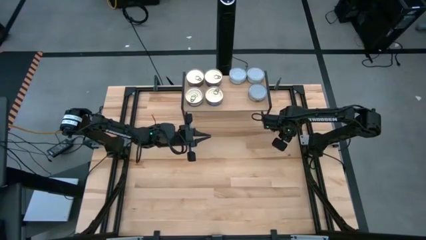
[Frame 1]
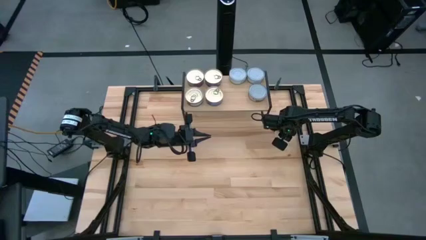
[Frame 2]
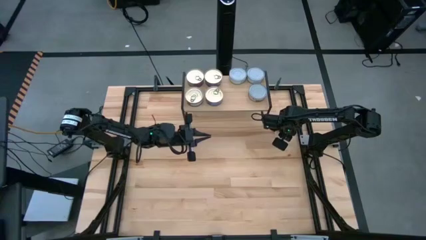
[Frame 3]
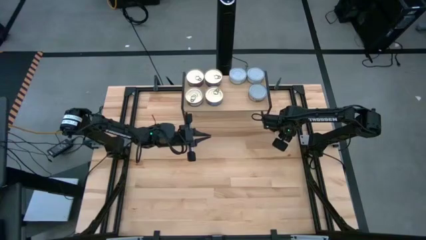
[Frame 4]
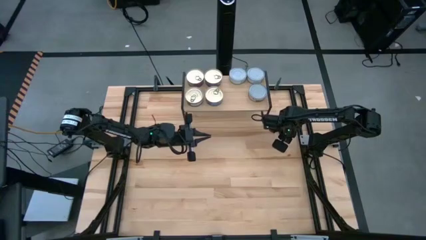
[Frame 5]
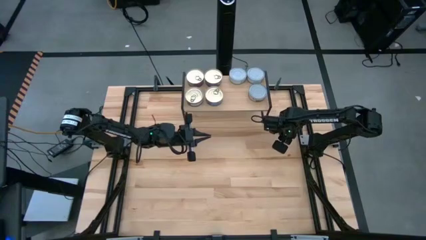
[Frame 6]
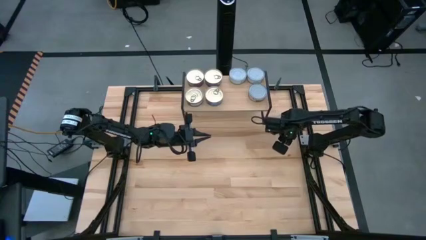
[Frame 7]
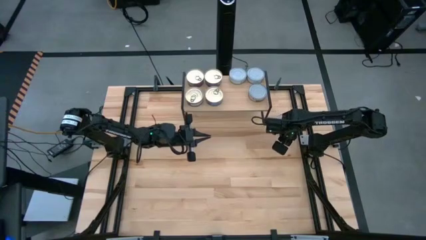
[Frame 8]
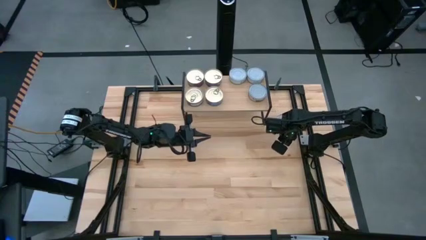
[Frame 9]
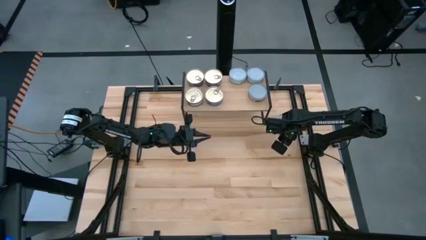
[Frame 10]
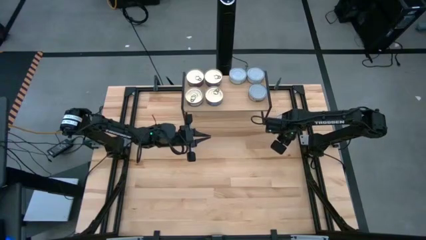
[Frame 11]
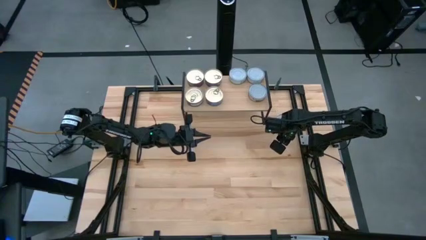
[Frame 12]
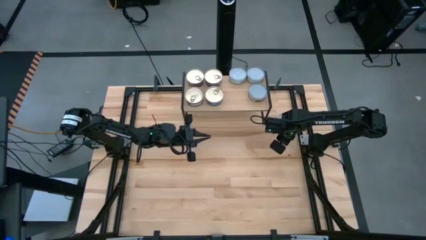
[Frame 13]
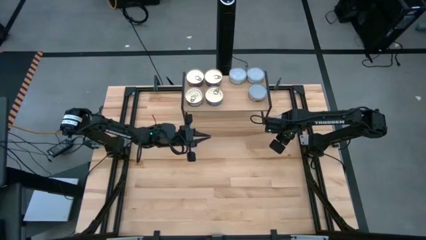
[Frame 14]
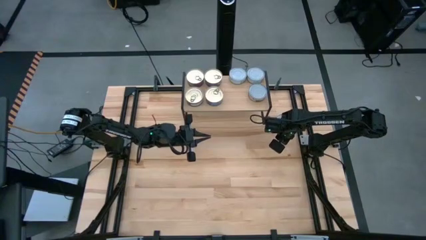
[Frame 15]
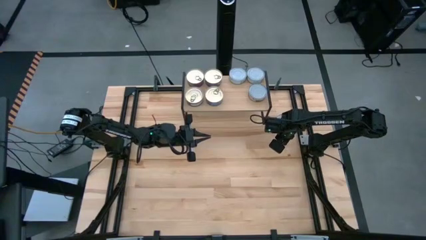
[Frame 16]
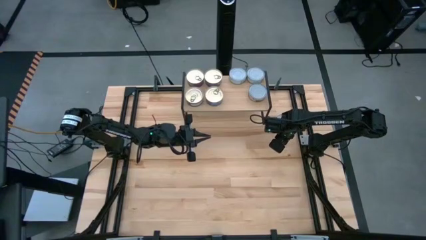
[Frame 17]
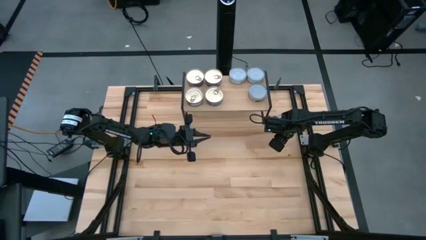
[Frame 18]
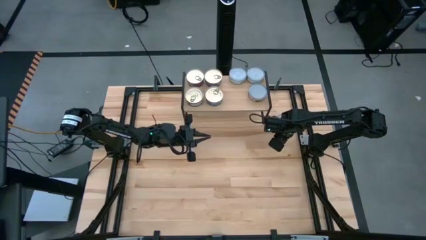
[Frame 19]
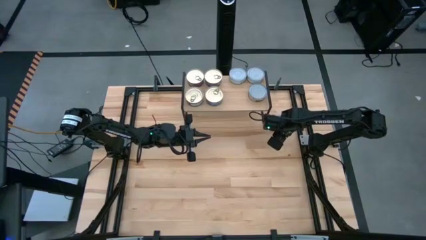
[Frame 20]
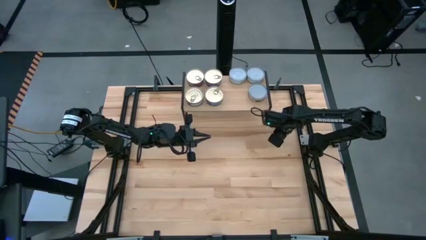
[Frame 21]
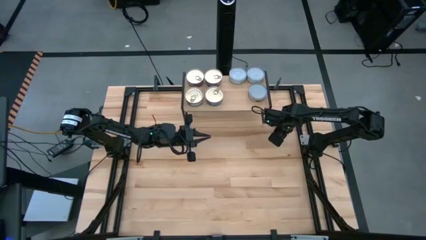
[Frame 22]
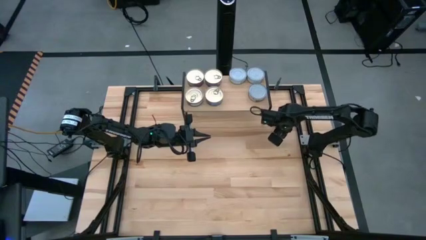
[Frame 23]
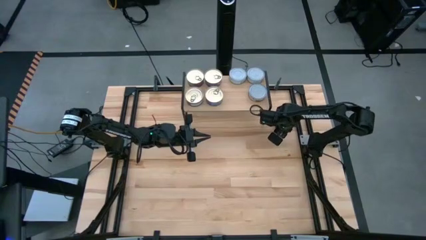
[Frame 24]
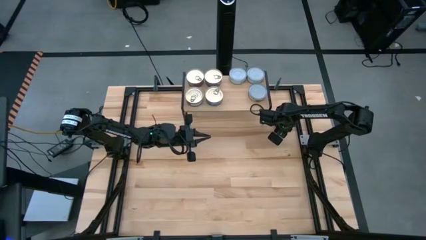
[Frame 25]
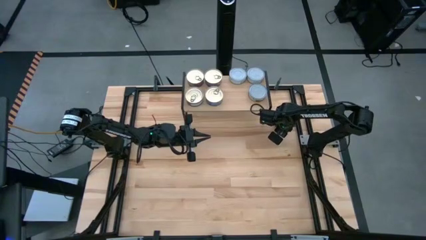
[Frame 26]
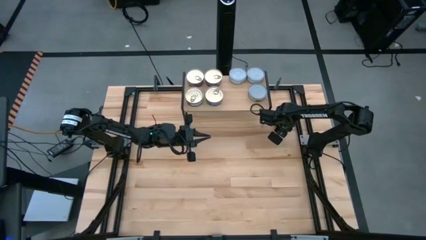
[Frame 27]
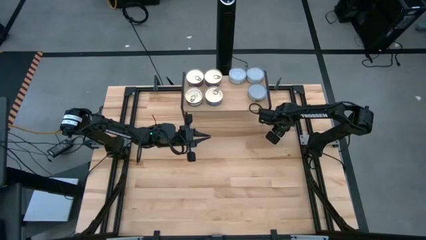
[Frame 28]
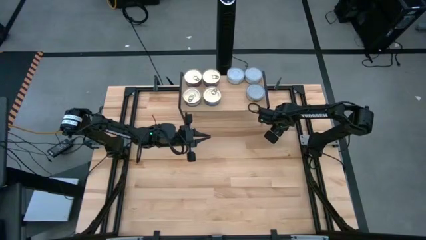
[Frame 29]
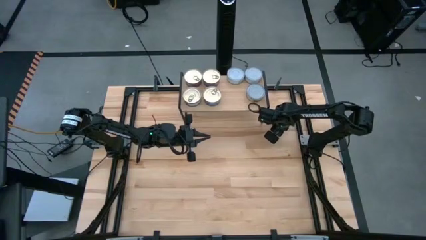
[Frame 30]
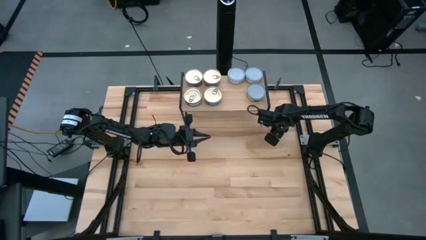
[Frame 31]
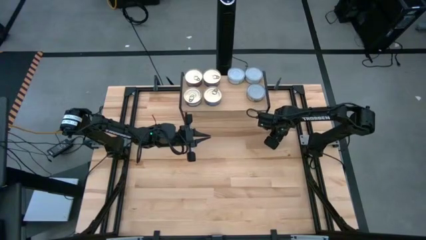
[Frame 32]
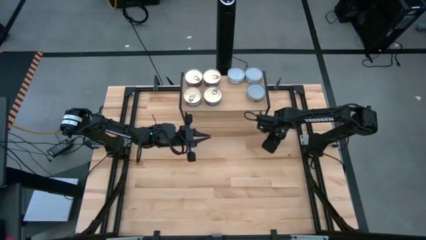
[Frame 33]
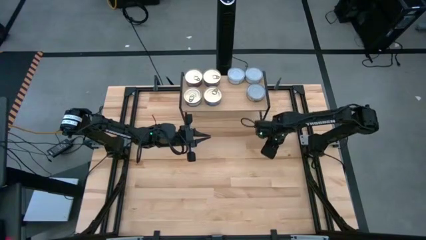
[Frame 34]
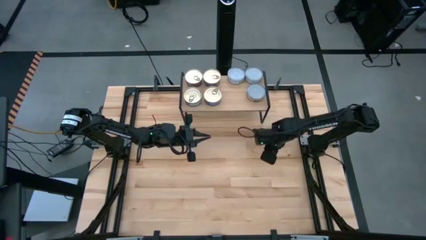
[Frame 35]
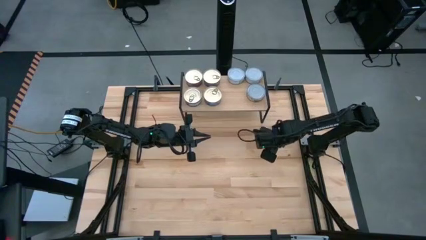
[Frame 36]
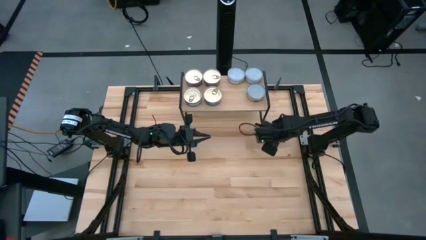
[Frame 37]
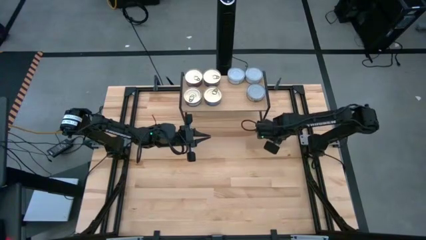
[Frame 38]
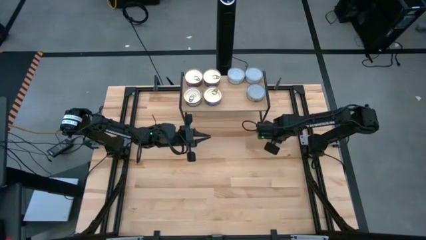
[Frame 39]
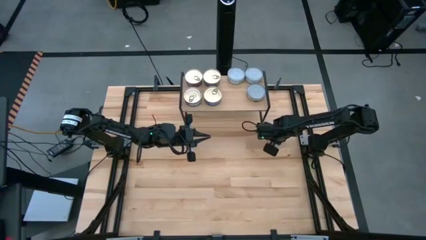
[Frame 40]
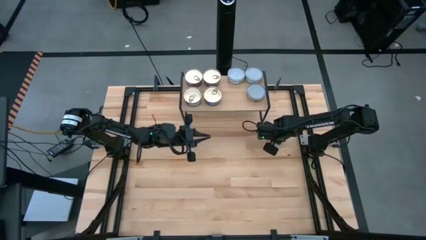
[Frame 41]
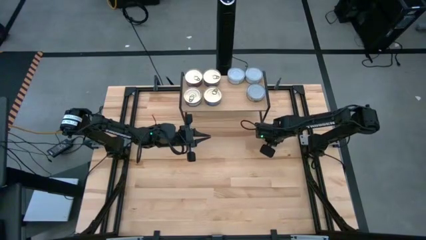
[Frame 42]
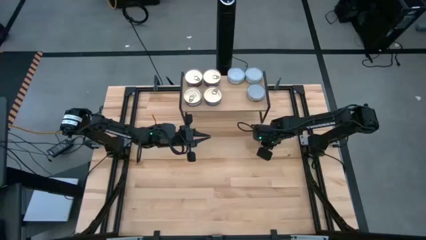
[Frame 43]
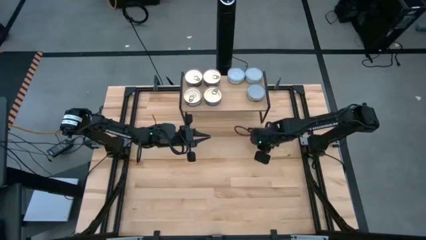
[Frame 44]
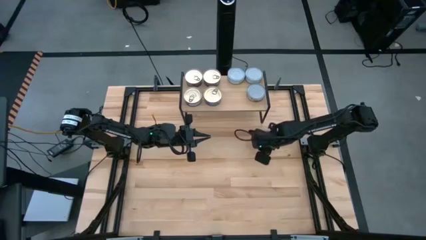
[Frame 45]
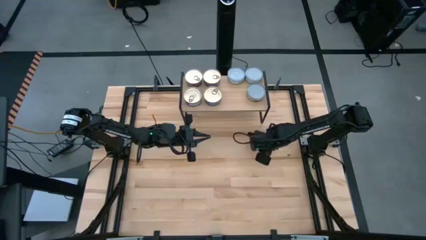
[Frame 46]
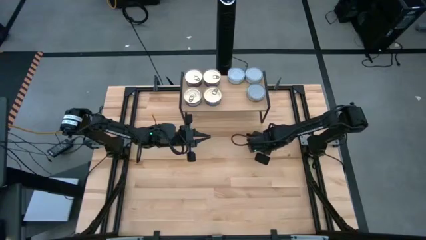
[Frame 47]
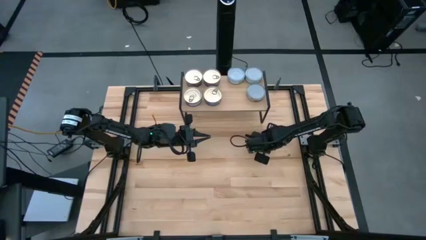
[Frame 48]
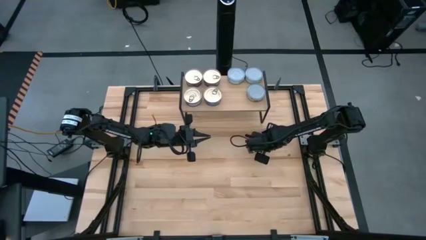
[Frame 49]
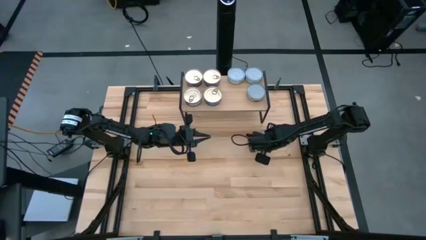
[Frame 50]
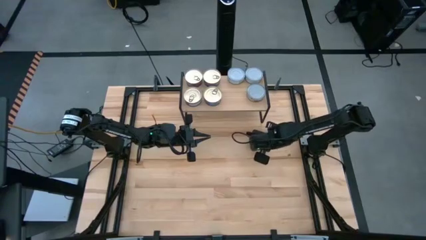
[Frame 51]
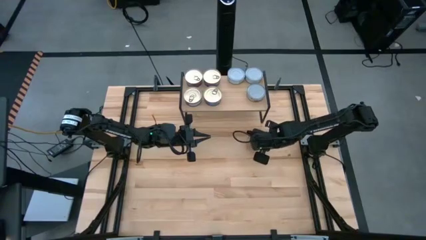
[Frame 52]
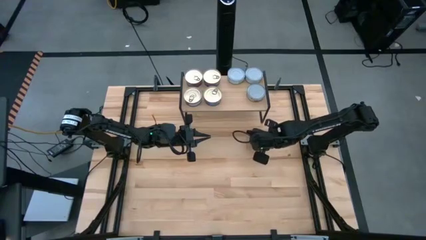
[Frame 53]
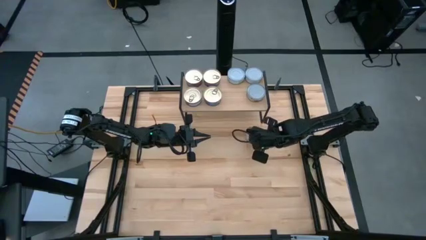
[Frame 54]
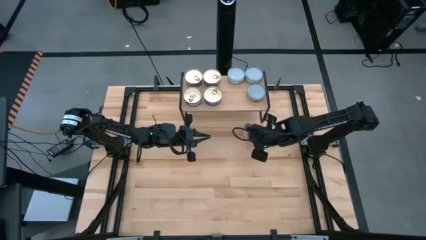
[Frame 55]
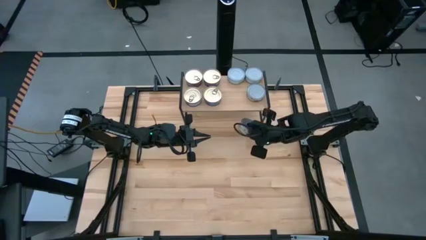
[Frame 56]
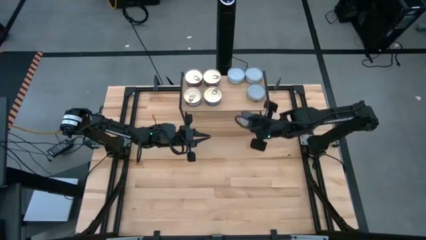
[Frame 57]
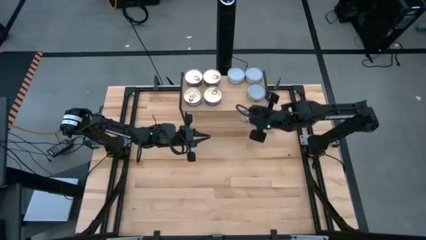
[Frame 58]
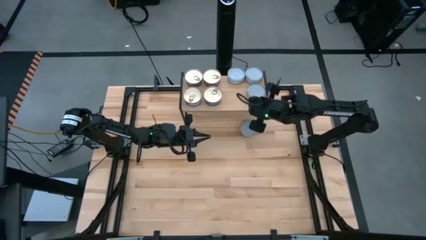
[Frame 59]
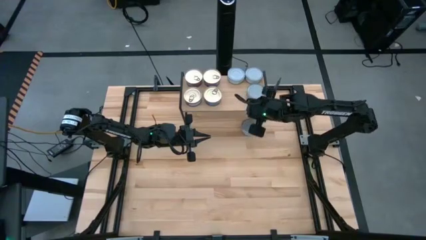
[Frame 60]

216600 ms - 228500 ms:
Task: Stack canned seafood by type on shelf
Put the green tuna can on the shelf aligned with the other green tuna can

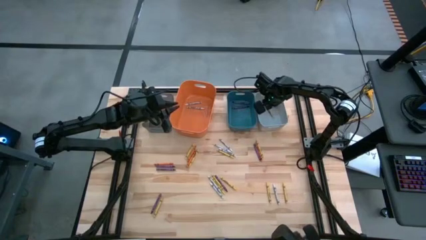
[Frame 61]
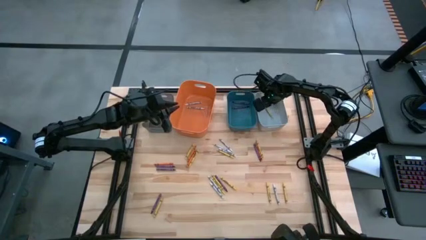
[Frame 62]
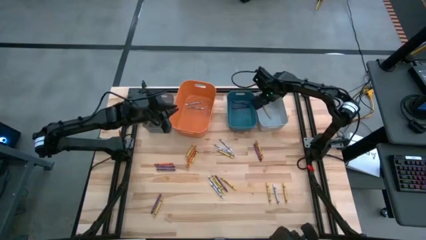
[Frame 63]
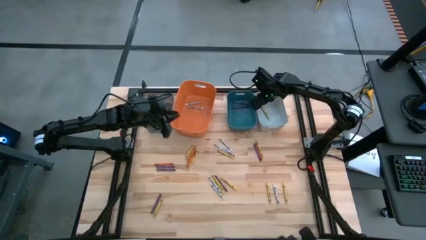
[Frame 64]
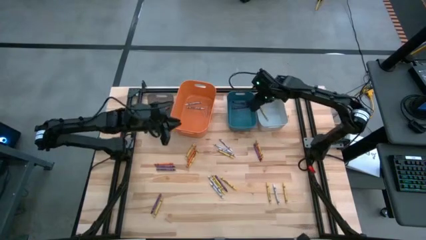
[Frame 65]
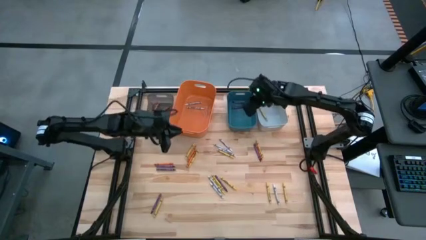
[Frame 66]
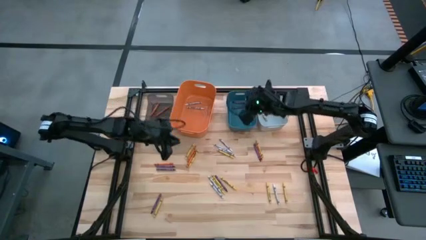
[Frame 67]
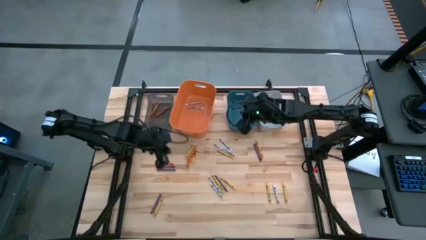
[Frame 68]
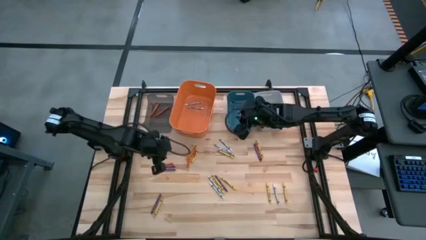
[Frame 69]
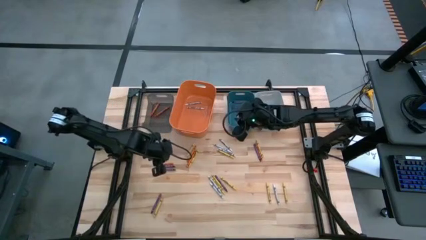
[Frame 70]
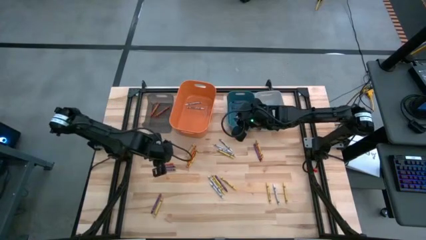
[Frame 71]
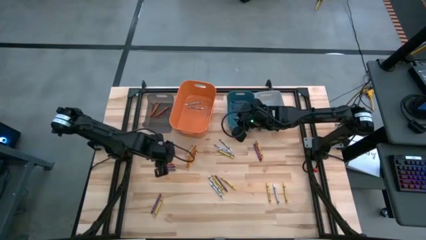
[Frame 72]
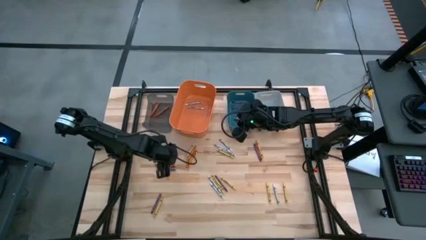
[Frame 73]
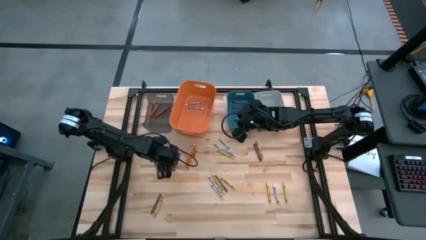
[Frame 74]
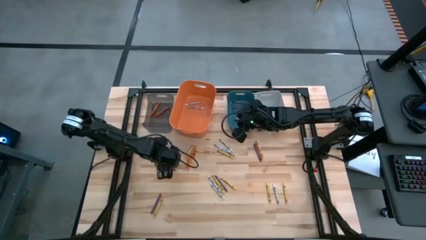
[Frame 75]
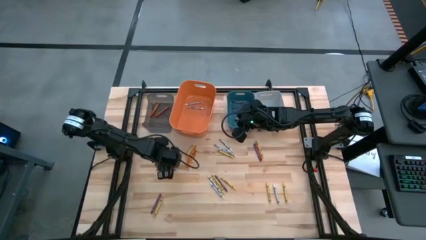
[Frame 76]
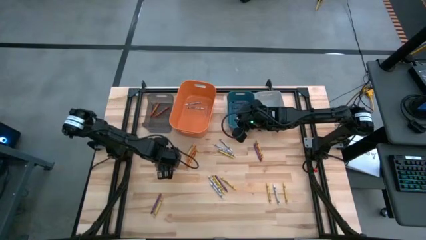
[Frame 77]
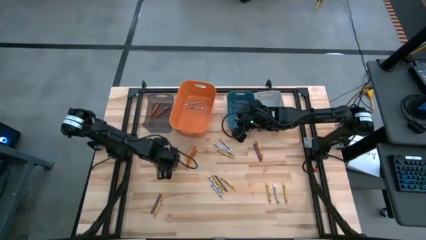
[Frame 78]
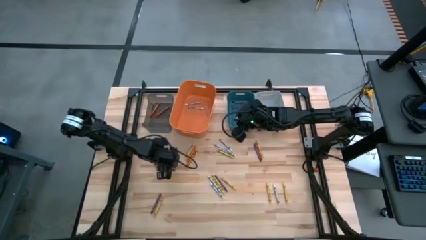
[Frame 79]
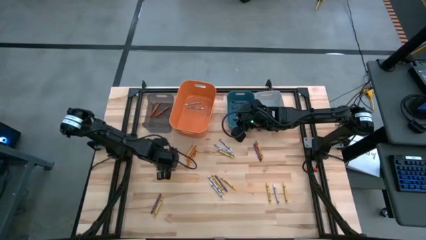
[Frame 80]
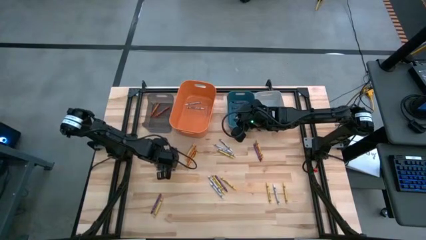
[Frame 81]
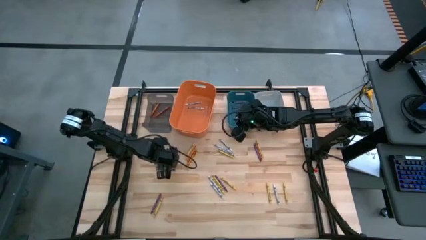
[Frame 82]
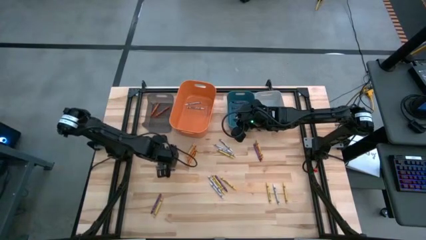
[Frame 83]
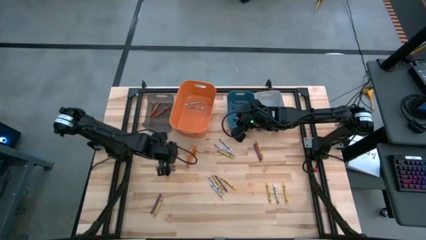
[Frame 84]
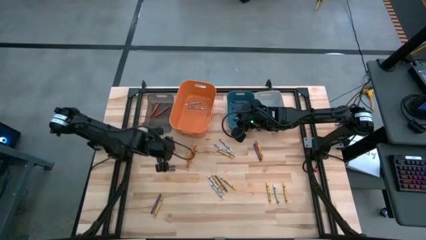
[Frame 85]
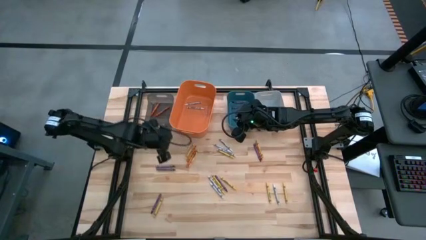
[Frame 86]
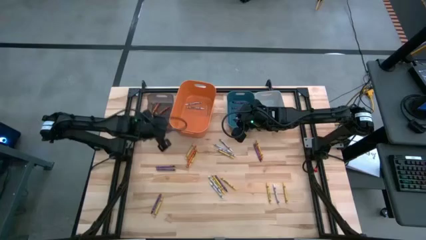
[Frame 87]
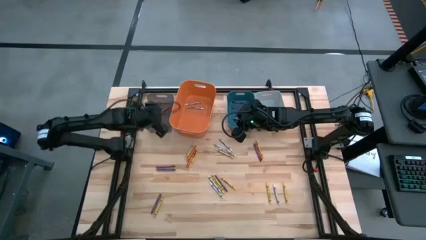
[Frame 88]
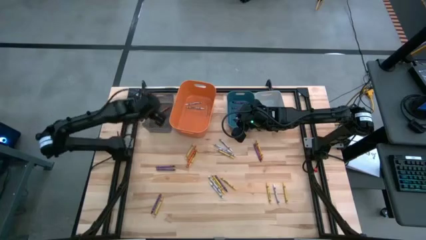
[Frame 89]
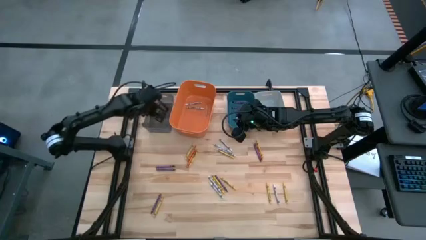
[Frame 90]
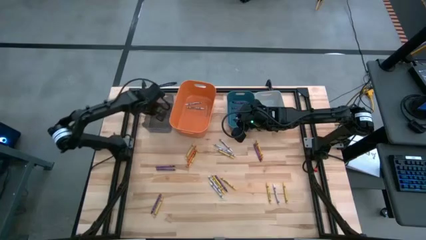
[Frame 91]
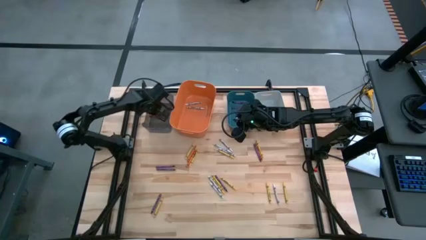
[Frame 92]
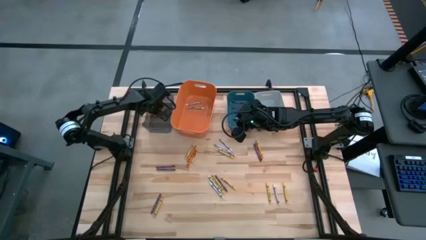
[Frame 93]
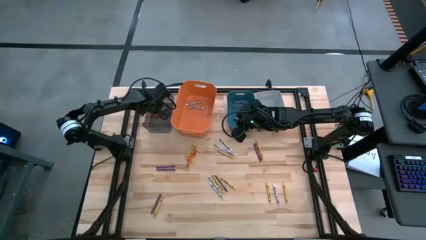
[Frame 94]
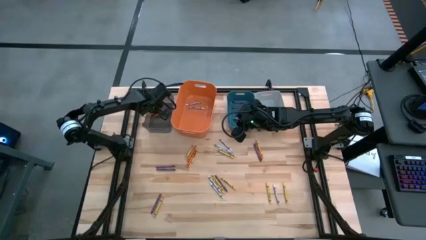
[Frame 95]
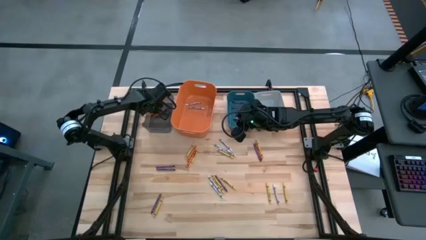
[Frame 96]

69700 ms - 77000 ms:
Task: Sort crayons
Put the orange crayon into the black bin
